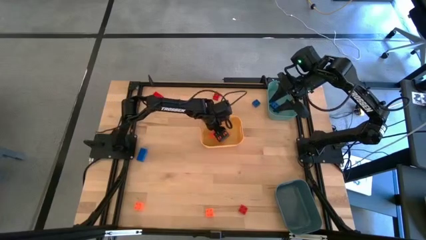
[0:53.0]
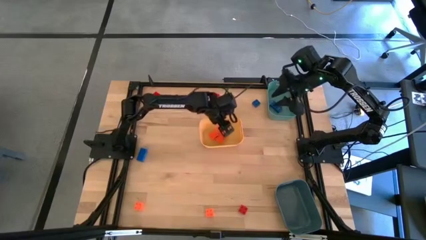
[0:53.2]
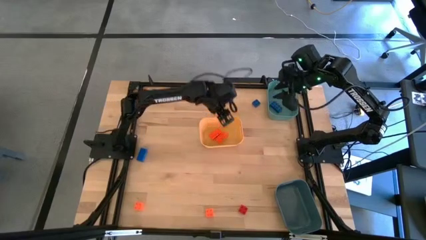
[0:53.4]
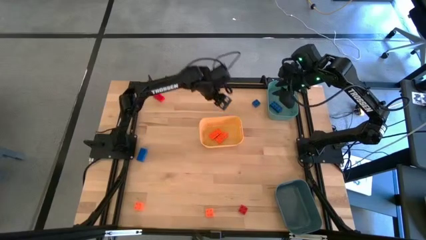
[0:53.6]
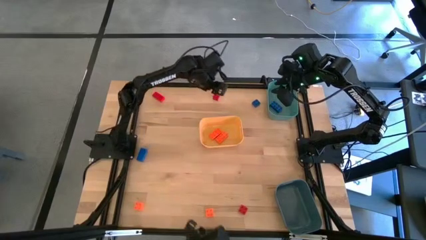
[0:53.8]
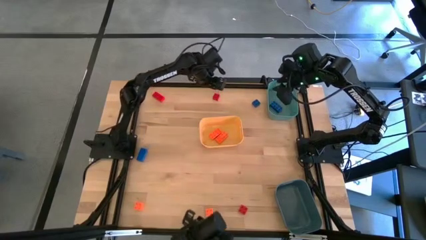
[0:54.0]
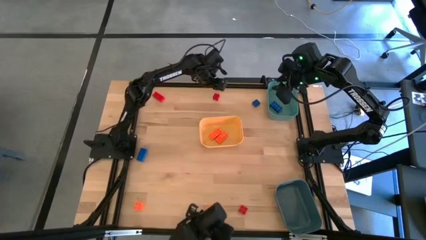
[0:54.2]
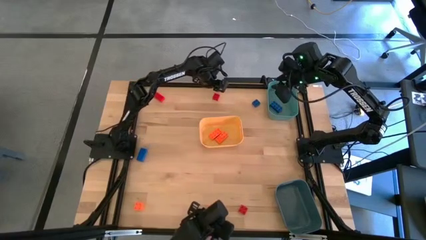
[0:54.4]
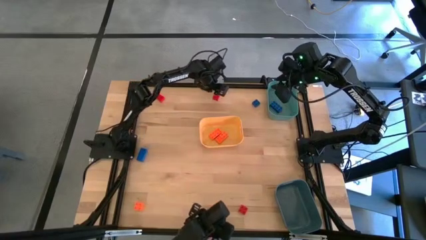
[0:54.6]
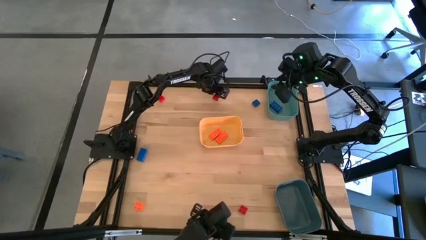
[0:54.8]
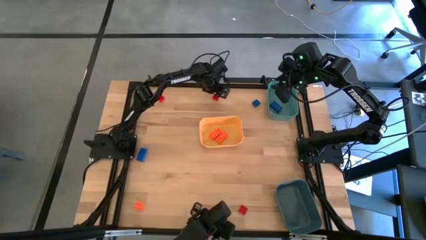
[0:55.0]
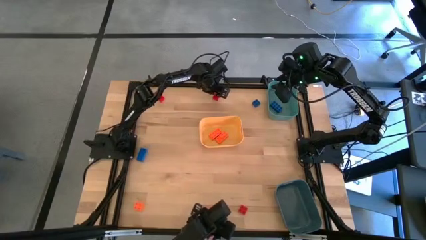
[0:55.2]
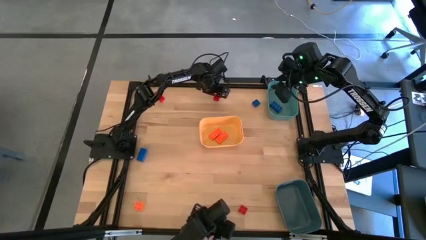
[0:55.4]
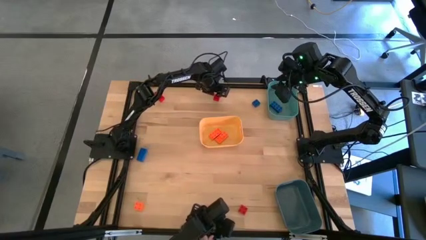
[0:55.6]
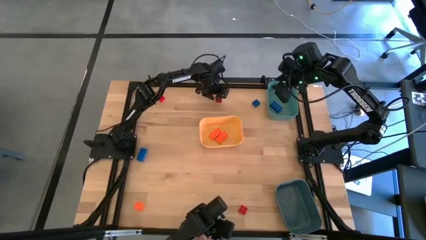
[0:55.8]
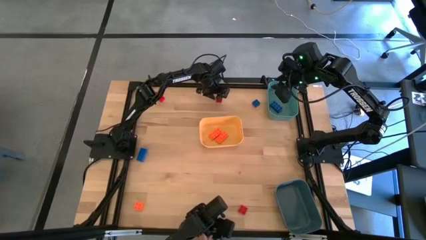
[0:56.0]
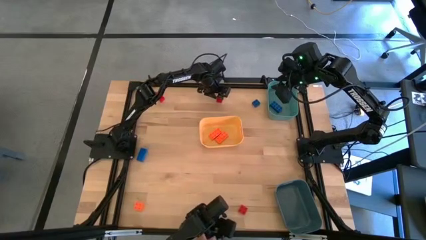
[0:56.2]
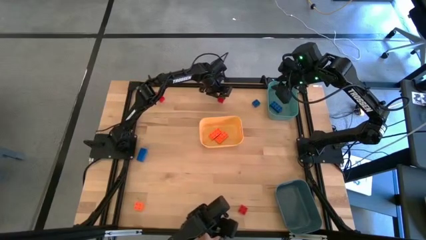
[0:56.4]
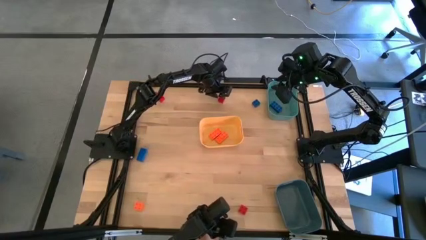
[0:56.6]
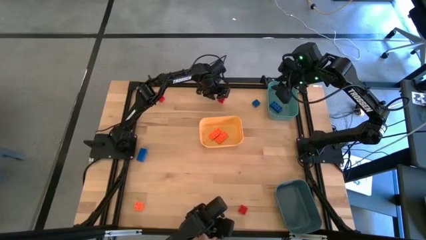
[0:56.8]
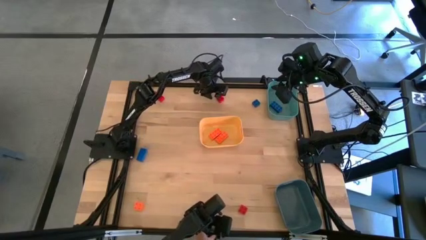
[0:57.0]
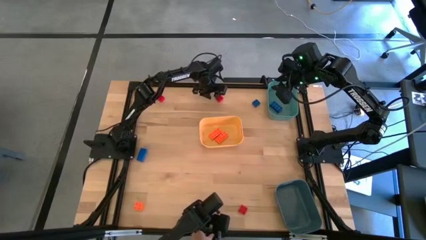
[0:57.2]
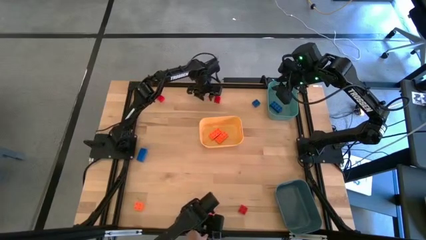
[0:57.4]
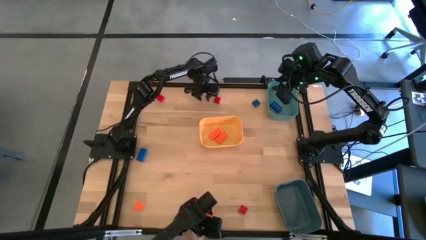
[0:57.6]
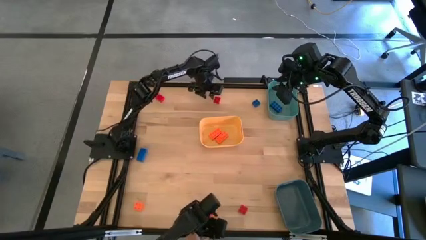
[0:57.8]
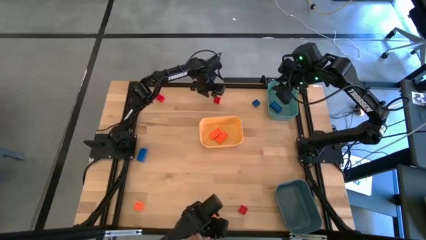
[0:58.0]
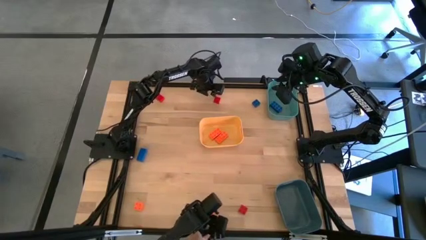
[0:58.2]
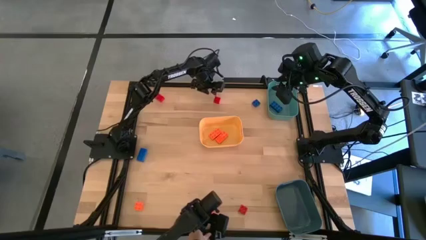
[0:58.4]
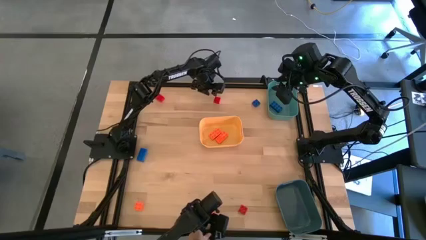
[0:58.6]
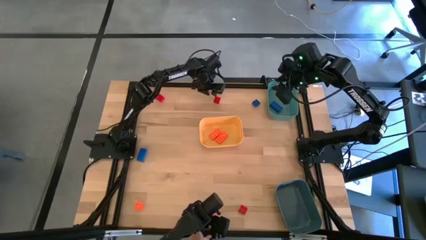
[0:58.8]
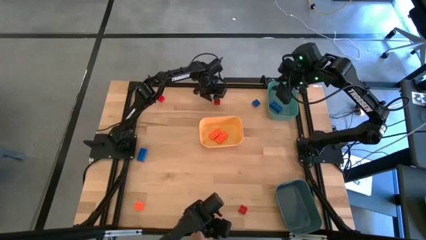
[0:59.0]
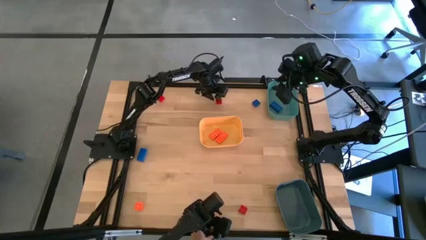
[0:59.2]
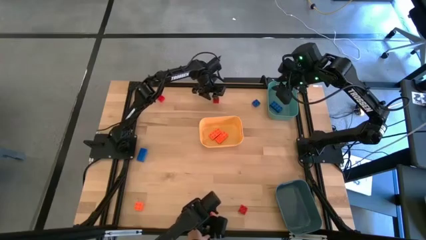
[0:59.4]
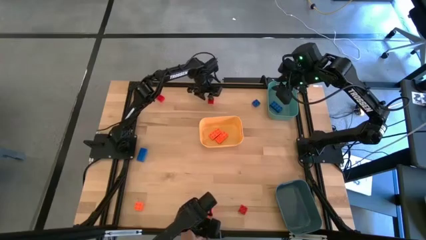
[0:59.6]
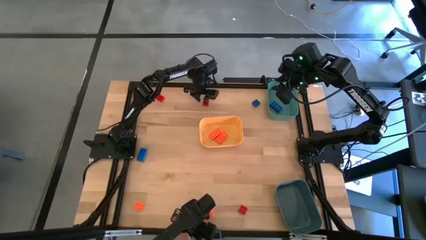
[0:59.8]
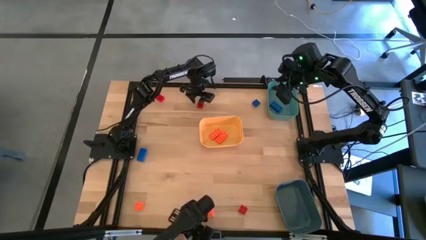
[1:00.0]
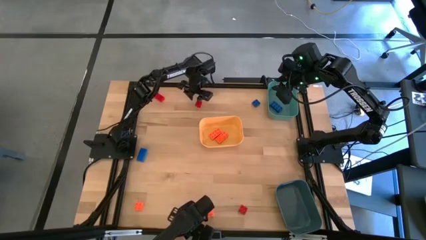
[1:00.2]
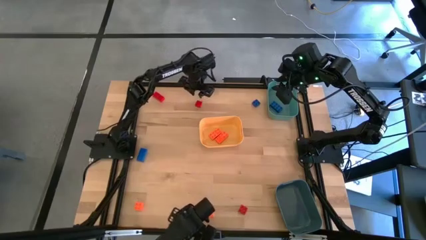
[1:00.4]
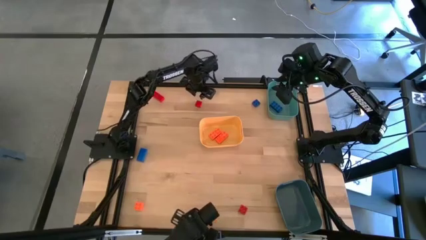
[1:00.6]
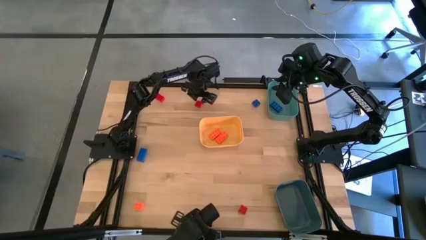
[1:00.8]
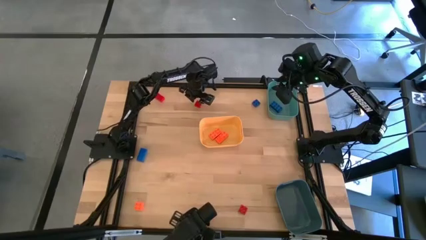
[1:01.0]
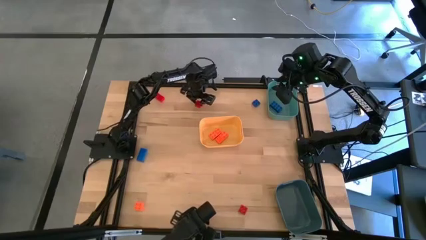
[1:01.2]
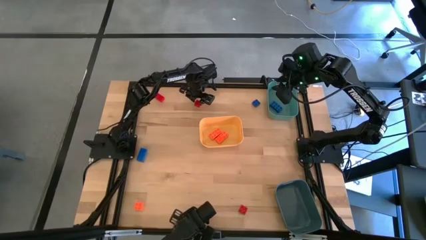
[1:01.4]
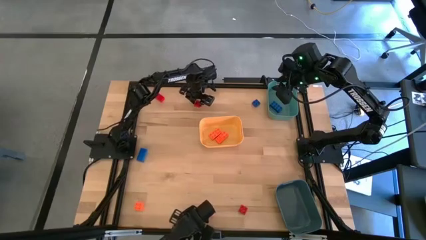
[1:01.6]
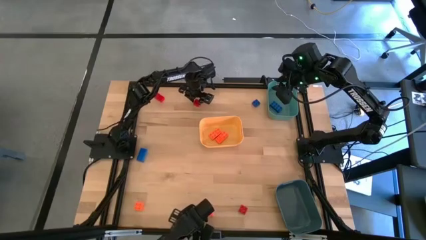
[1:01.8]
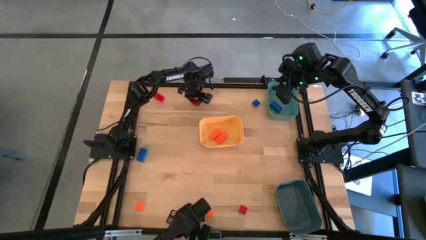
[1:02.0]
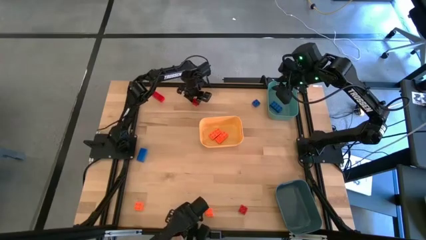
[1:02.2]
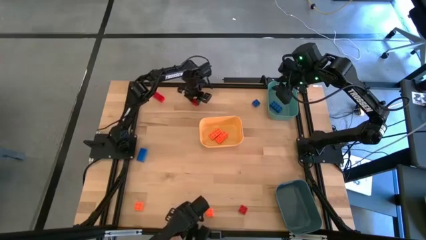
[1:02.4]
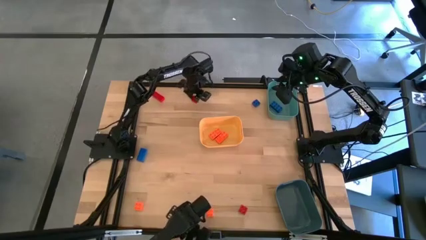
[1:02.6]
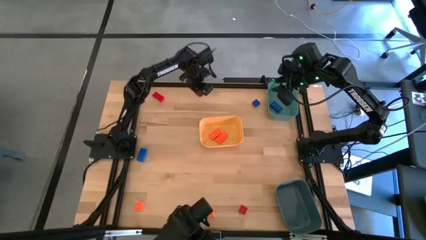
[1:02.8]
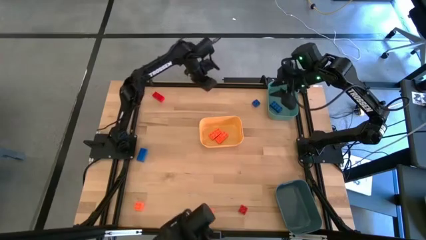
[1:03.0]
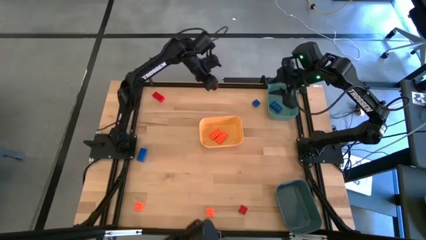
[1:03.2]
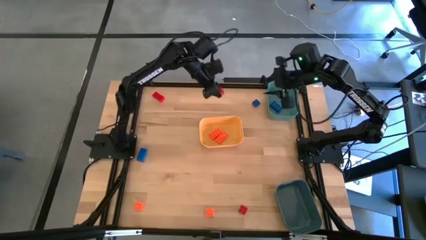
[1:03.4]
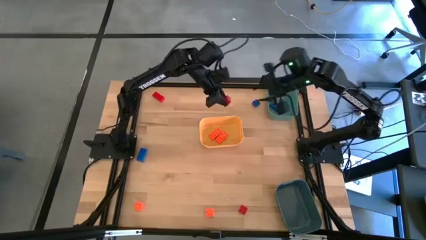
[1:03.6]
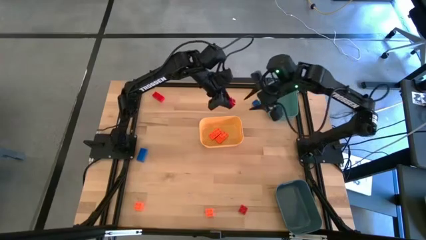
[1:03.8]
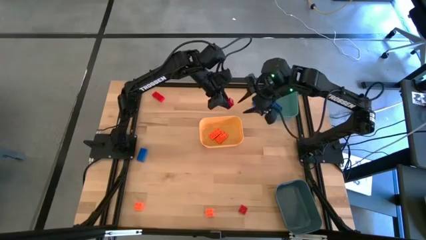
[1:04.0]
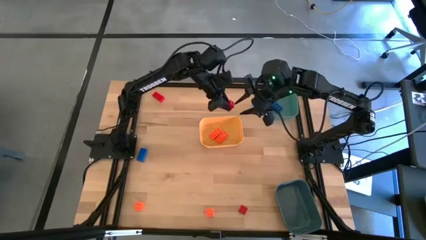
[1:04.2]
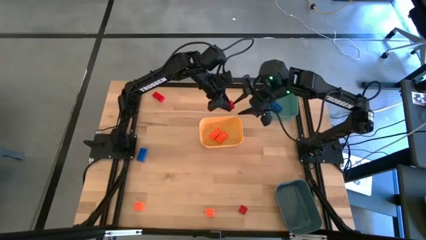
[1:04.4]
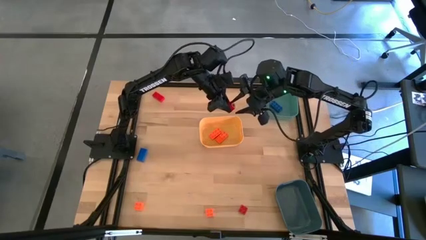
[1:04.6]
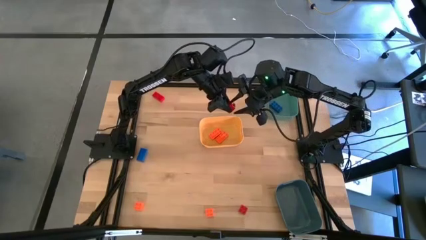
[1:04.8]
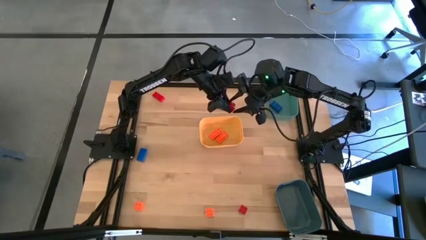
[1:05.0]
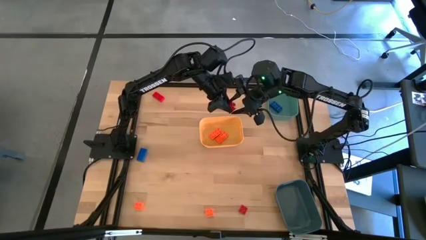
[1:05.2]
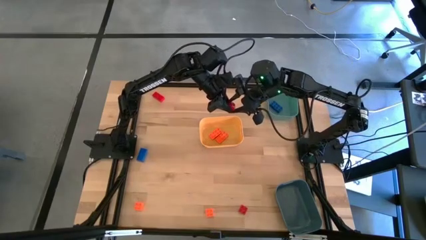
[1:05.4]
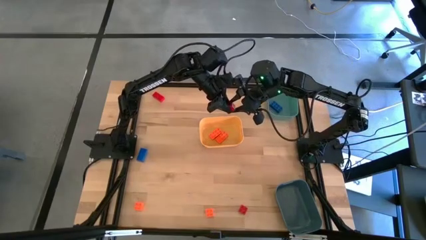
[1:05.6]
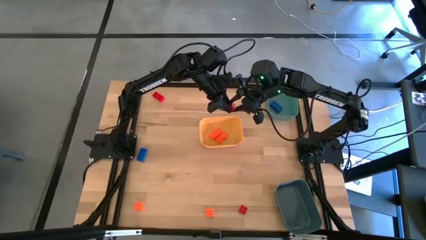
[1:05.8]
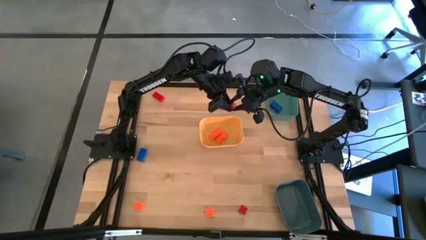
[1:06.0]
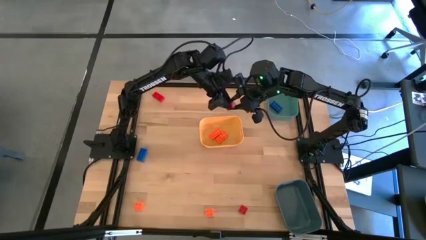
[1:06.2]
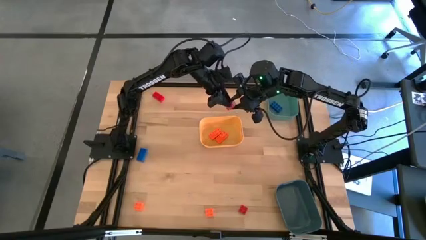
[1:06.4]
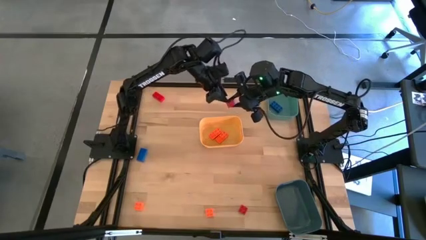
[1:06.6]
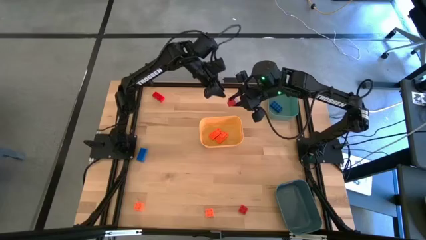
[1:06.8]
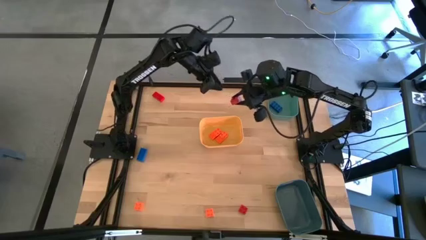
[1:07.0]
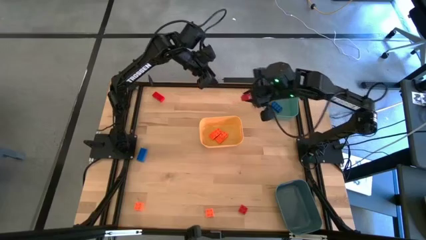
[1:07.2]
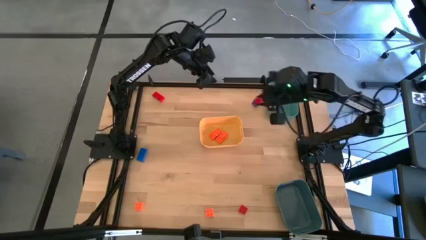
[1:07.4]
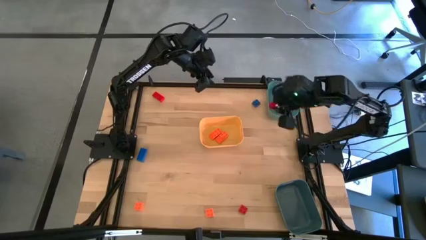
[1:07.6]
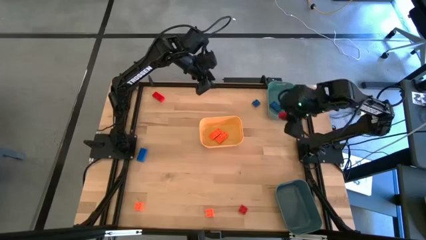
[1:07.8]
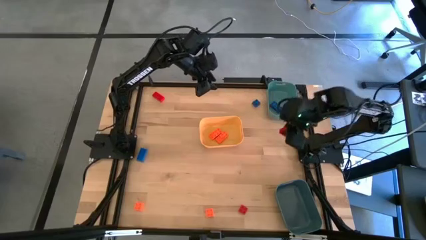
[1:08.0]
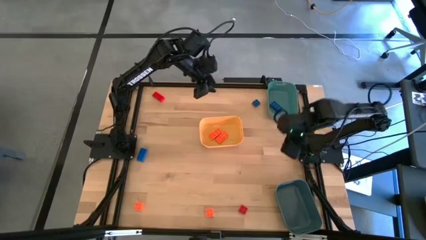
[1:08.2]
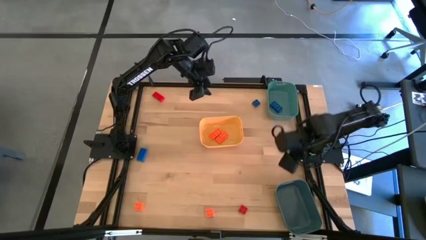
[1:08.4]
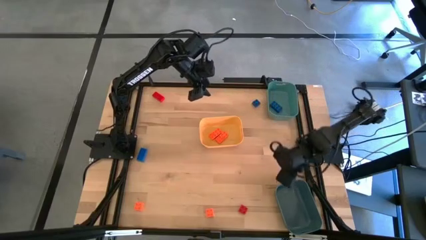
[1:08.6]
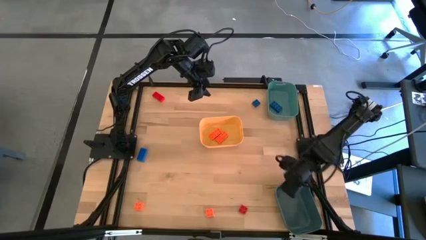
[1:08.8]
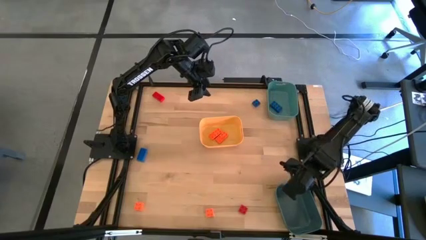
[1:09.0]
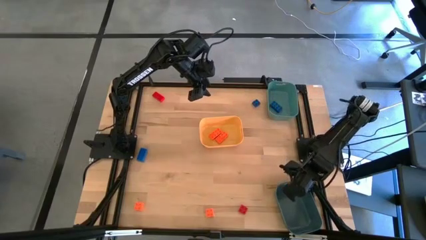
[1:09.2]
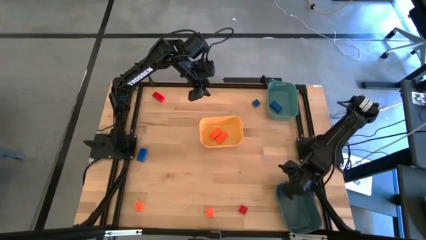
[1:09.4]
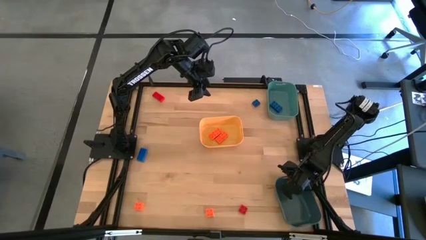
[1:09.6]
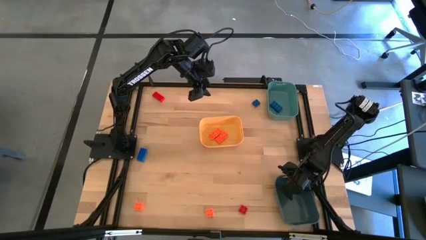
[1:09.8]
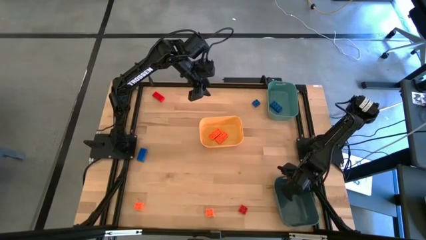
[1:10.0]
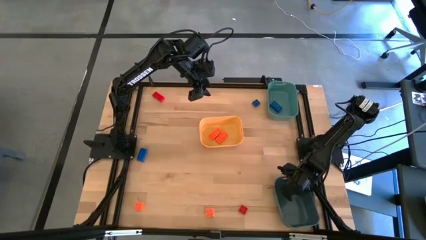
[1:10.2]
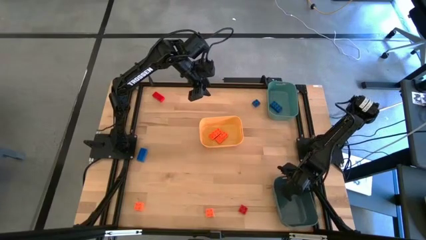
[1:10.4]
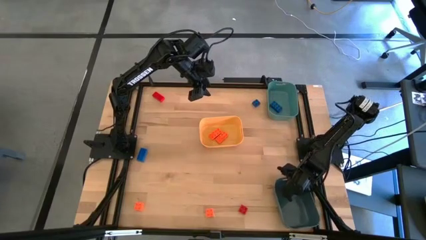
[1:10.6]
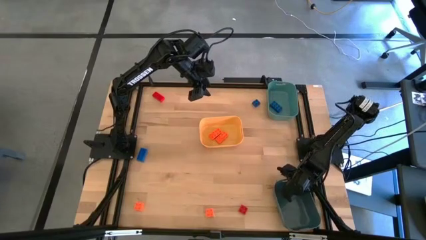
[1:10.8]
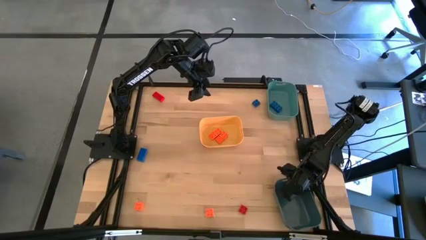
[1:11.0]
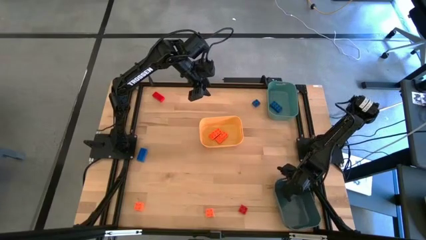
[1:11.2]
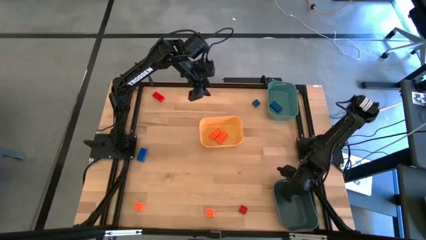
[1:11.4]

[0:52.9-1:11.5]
Task: Sort & place blocks by color
Put the red game piece into the gray bin
